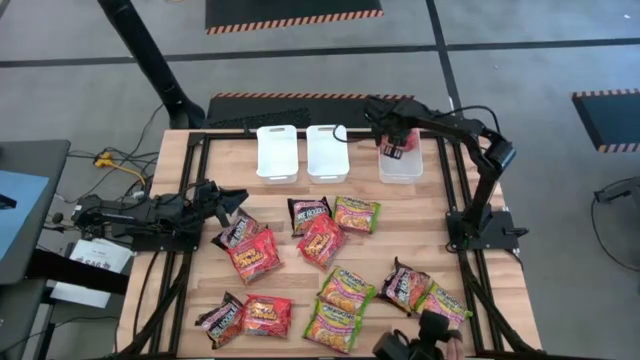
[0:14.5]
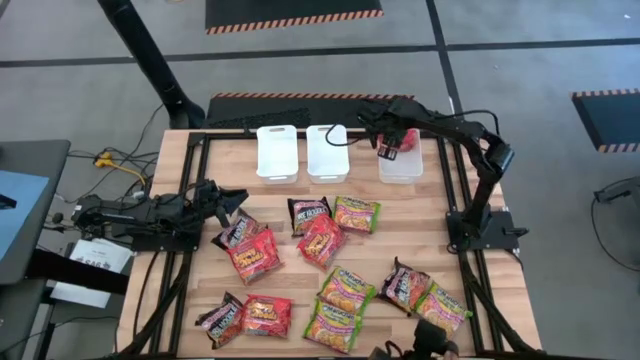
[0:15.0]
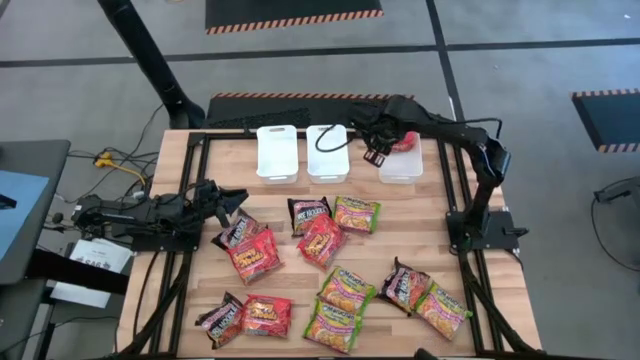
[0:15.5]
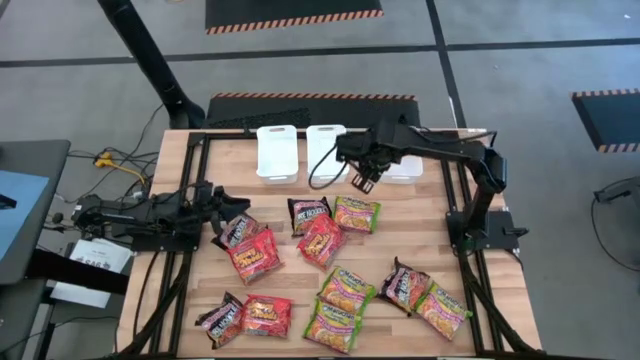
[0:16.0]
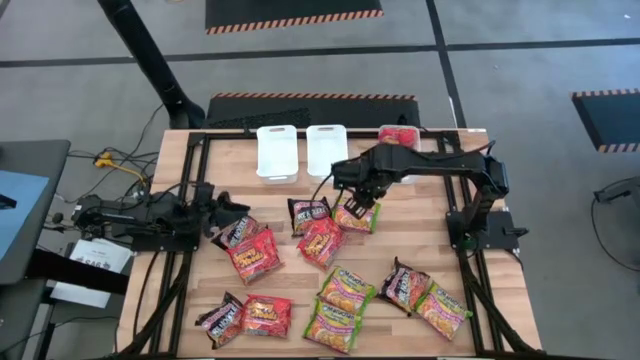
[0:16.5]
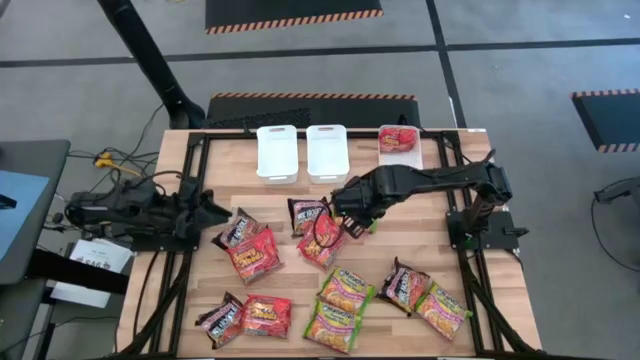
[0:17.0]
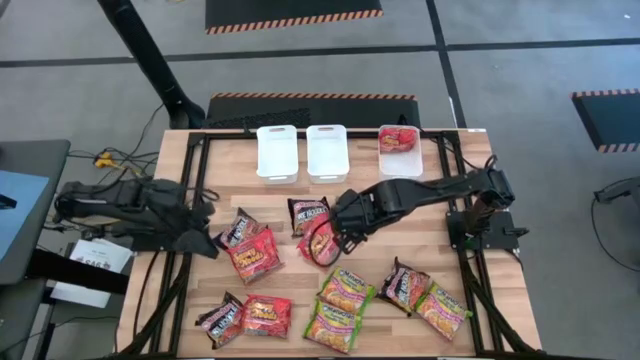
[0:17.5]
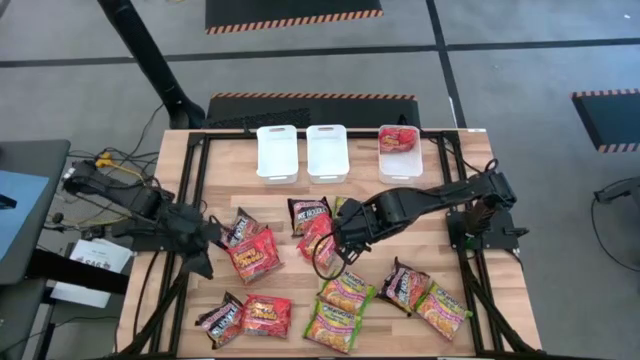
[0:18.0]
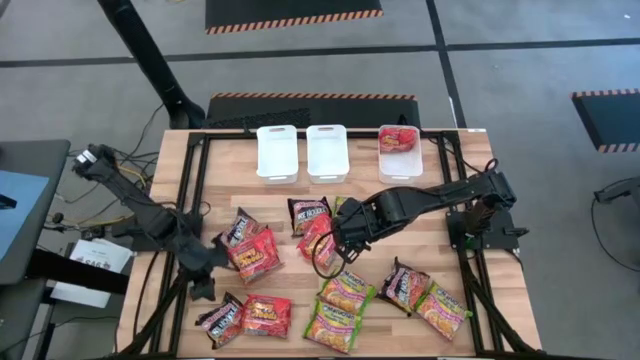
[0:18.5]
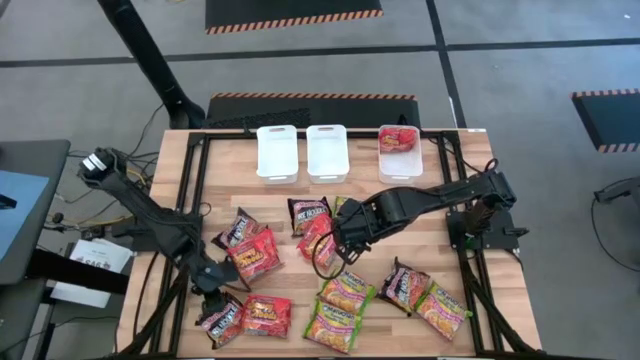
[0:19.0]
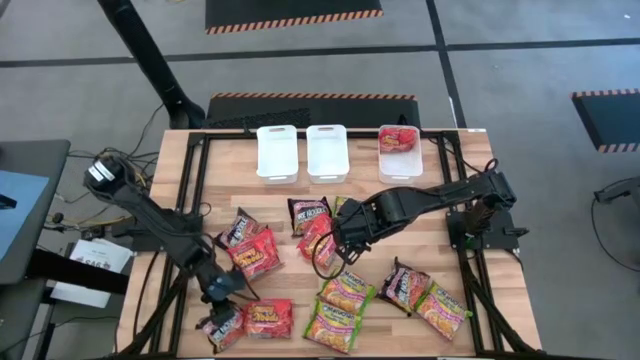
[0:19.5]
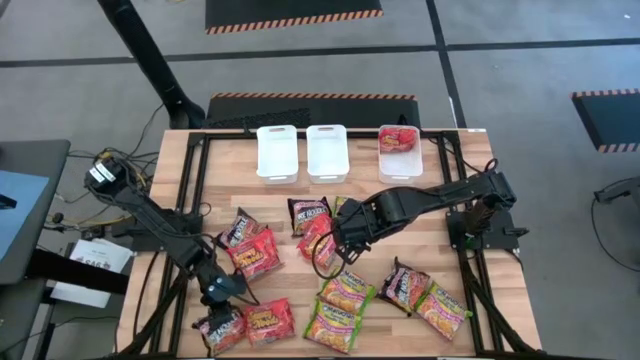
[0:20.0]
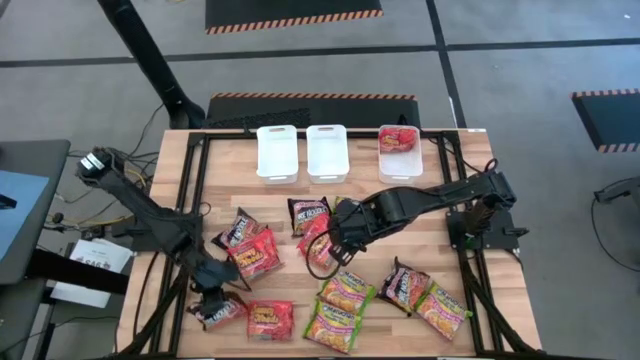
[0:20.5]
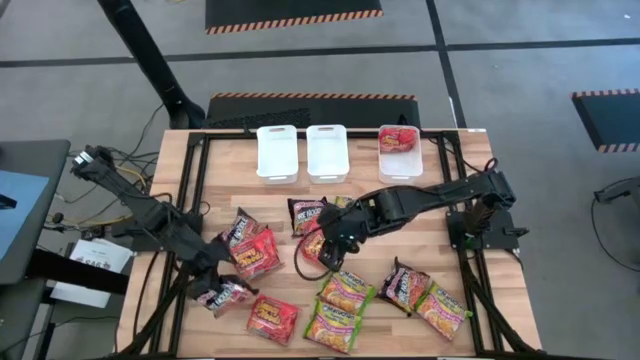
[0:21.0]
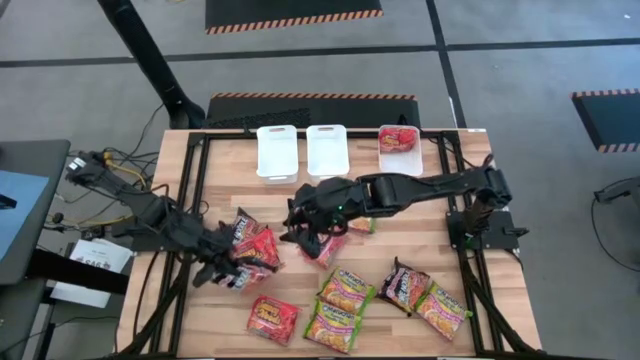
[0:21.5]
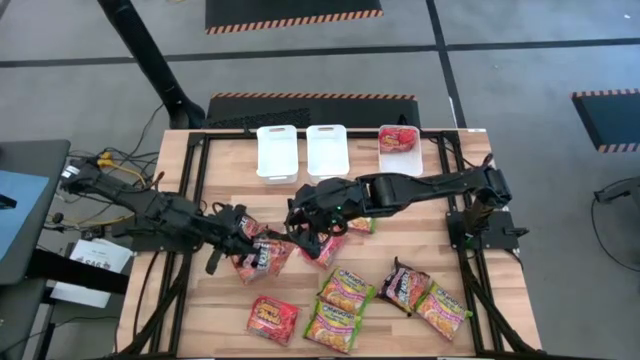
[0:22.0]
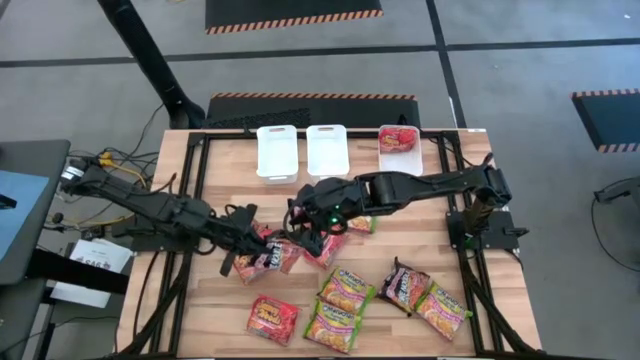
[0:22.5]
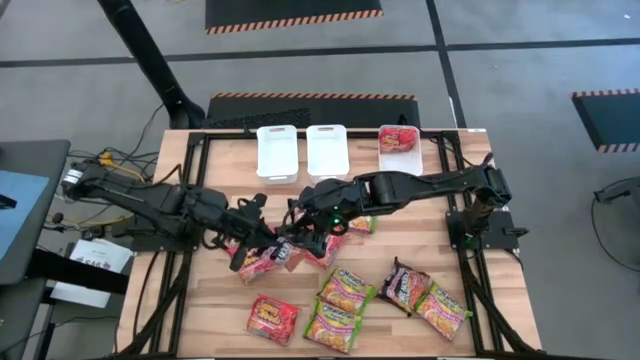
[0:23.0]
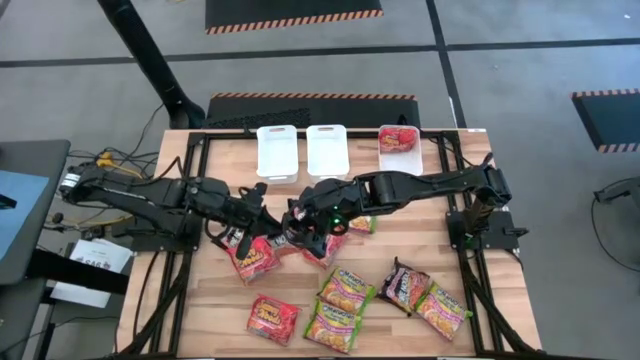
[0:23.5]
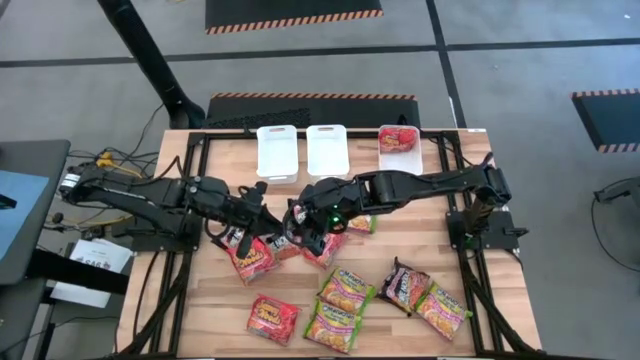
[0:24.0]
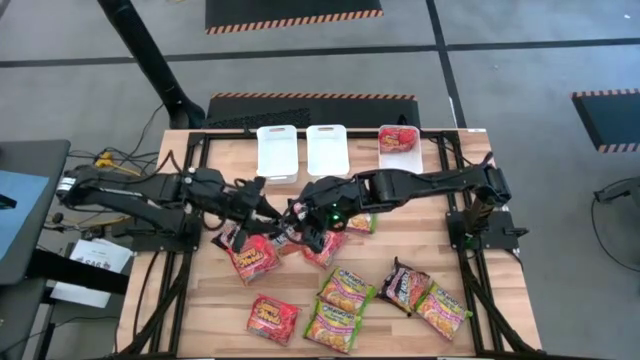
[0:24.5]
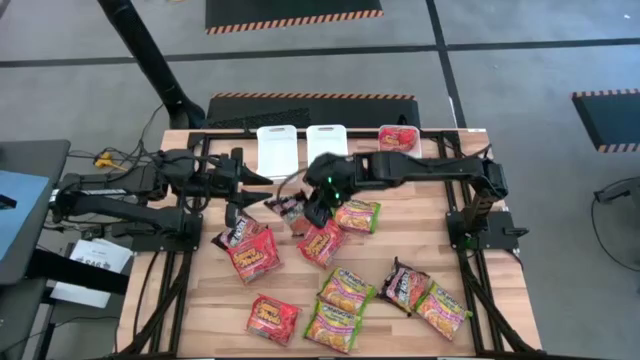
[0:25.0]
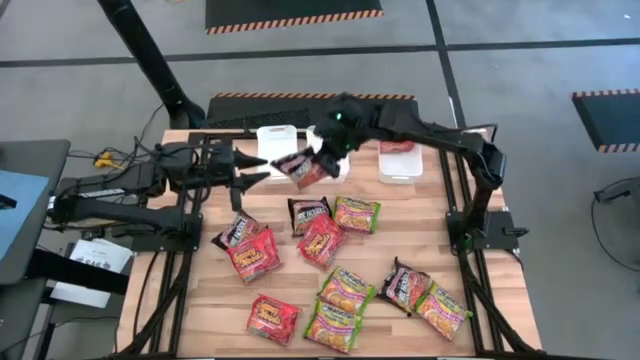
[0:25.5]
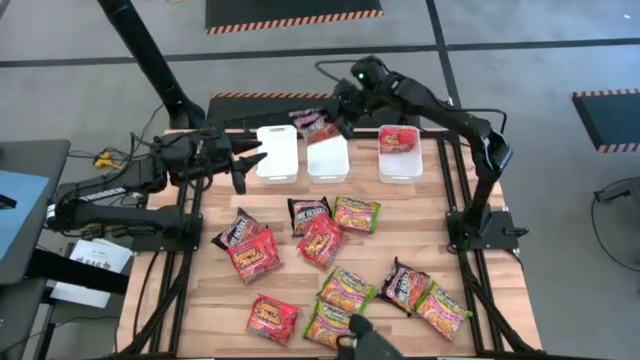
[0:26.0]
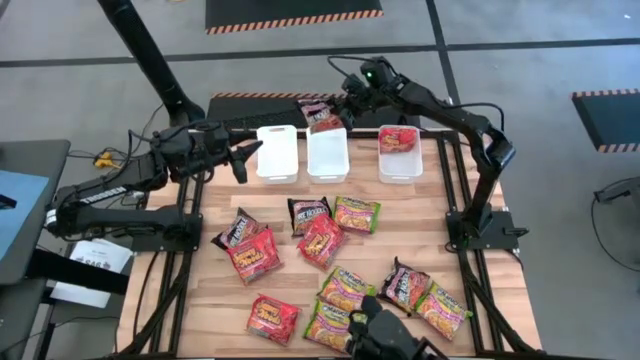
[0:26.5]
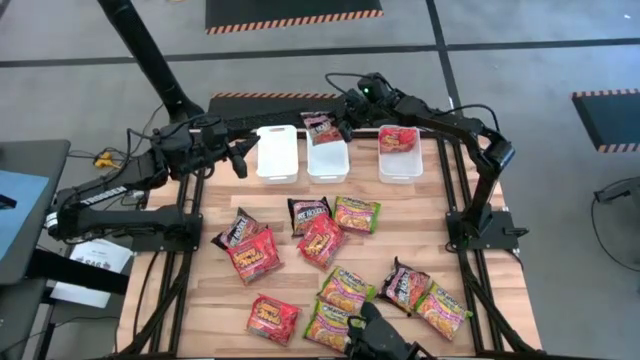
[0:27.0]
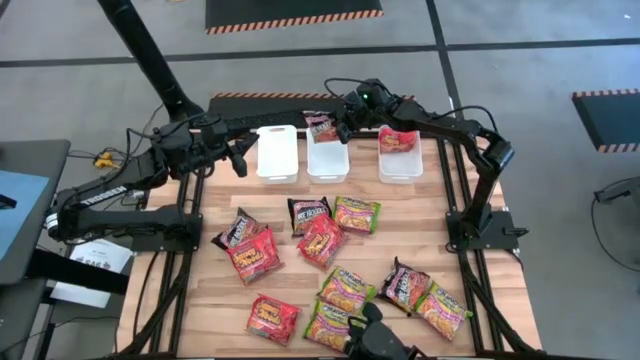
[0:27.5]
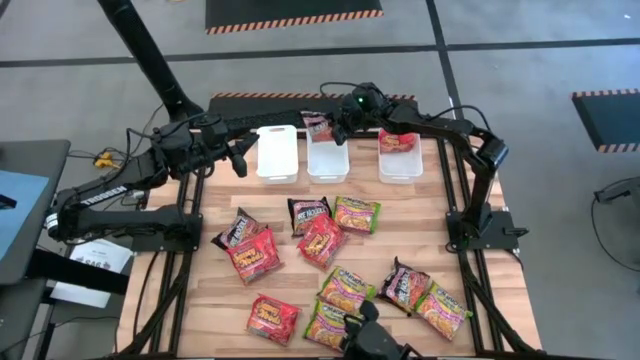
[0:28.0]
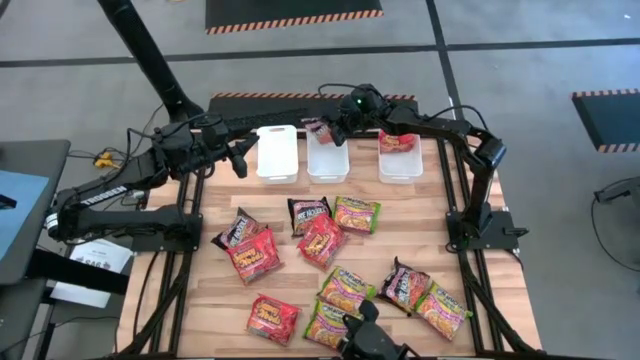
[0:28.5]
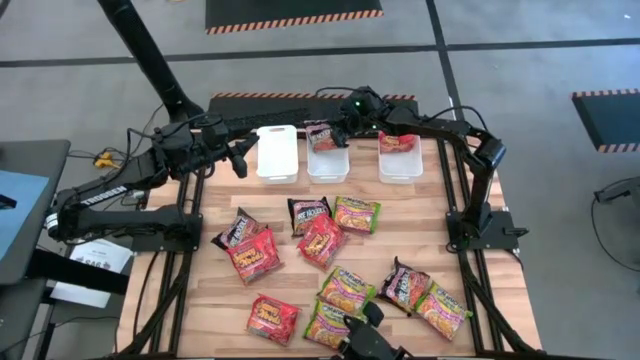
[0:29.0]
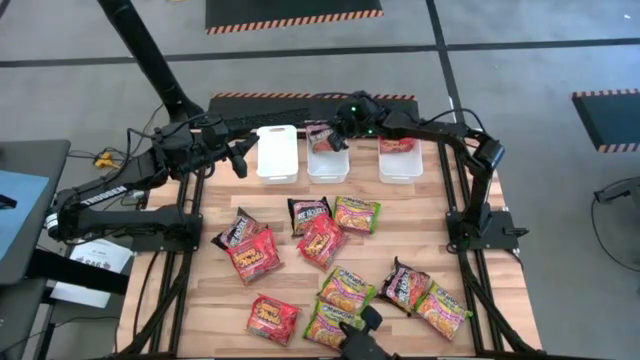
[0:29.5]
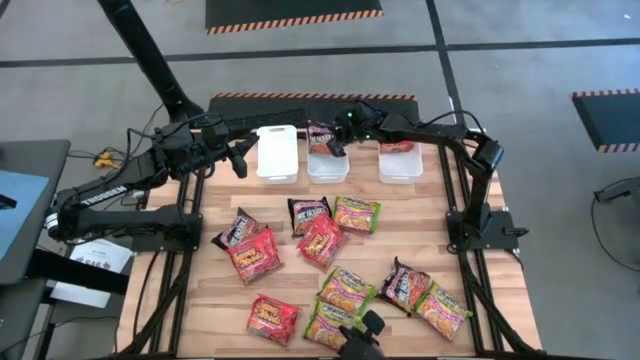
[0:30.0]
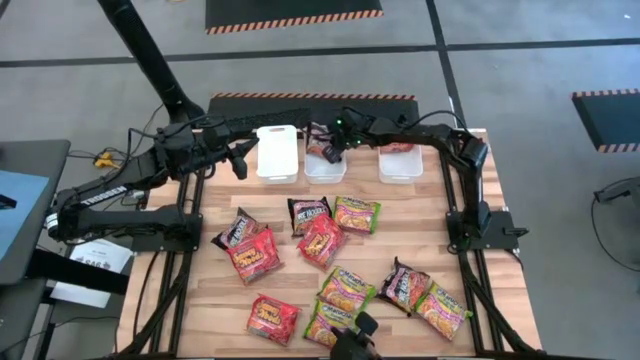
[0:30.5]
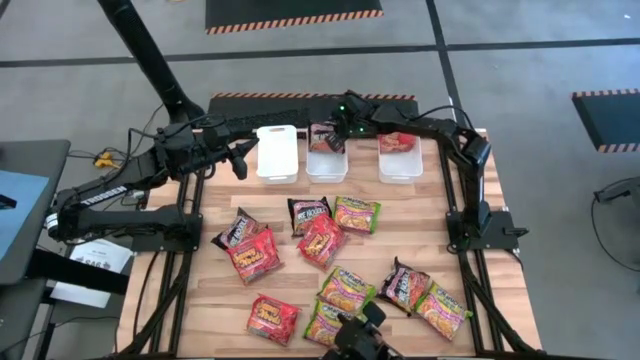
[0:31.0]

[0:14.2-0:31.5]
Task: Sort Maruchan noodles
Put the black noodle pack into the middle white bin

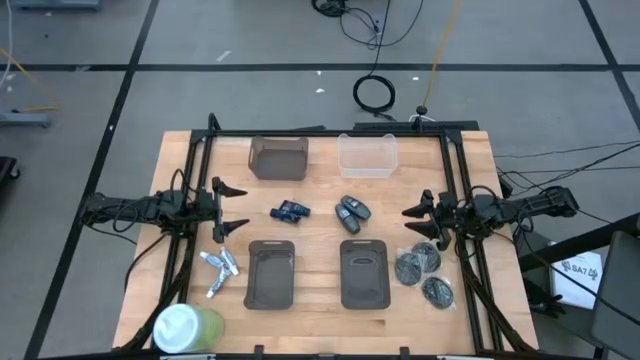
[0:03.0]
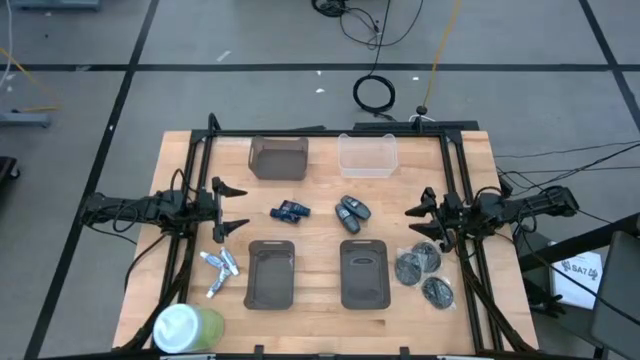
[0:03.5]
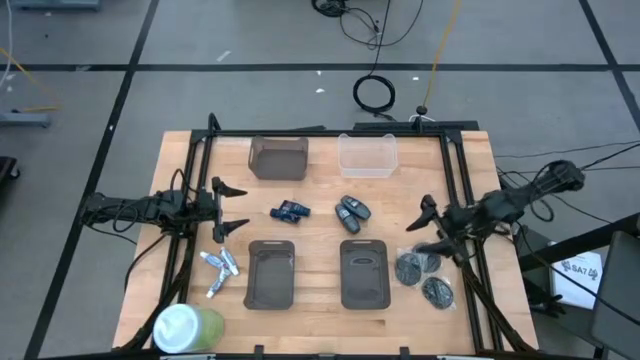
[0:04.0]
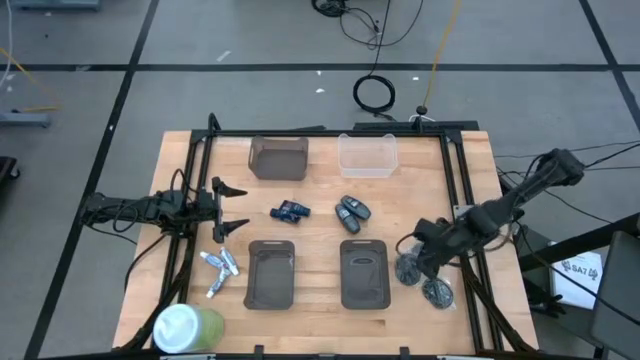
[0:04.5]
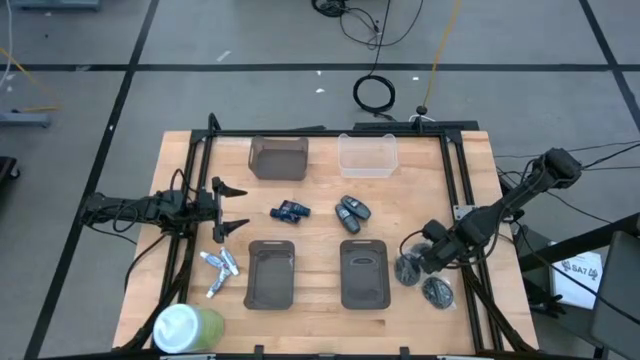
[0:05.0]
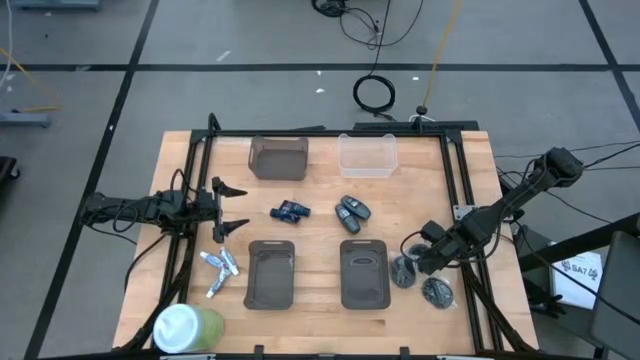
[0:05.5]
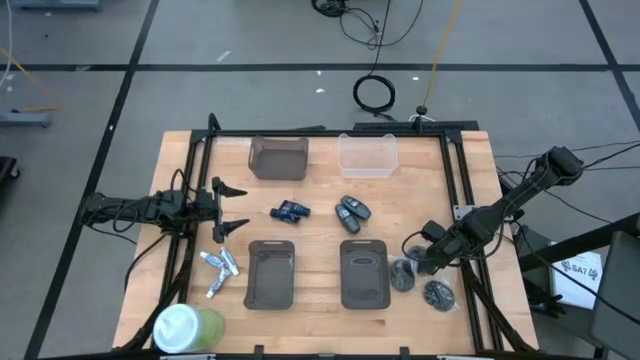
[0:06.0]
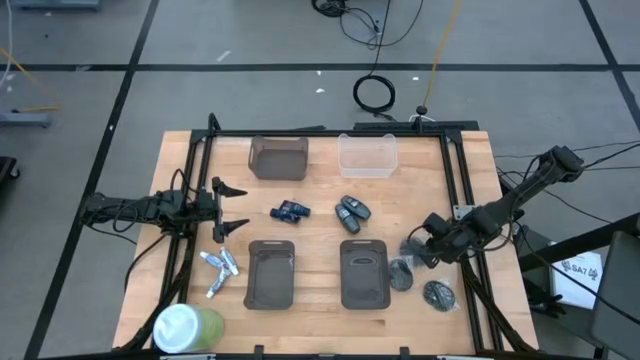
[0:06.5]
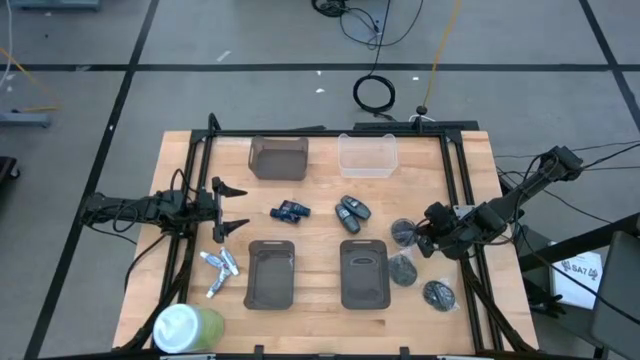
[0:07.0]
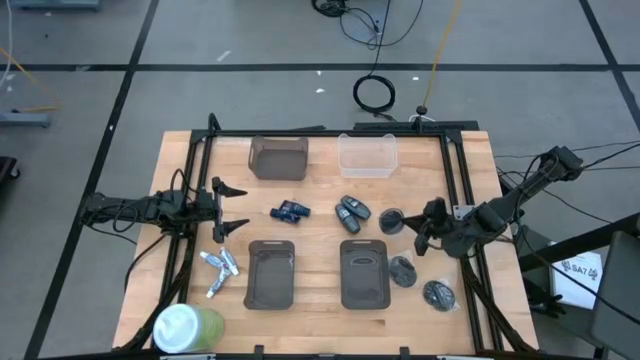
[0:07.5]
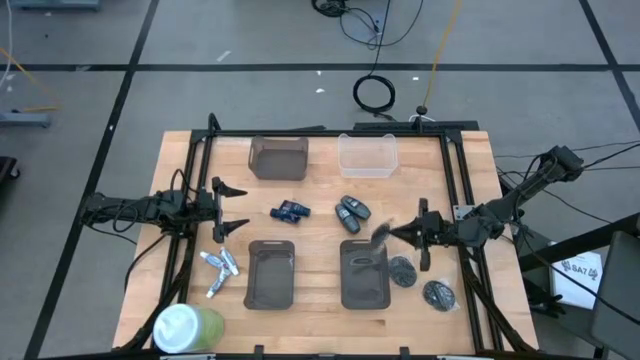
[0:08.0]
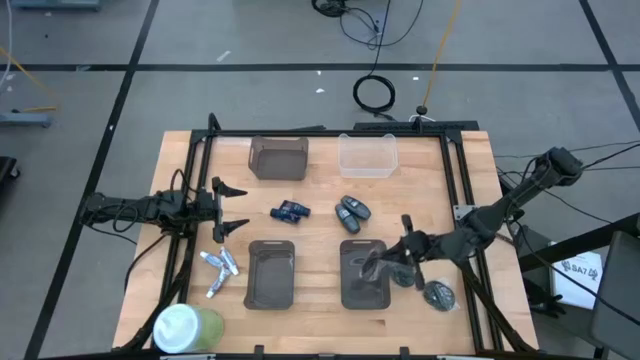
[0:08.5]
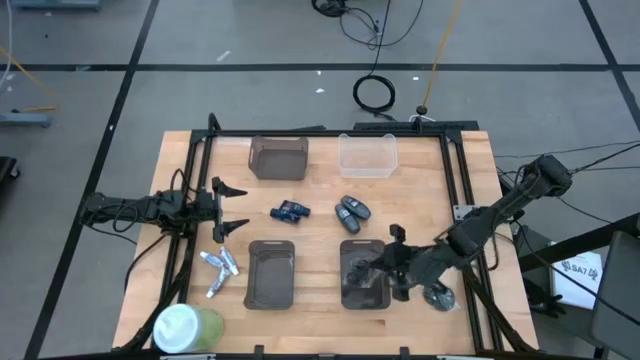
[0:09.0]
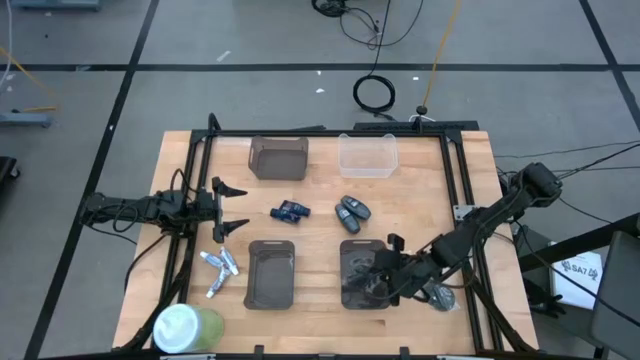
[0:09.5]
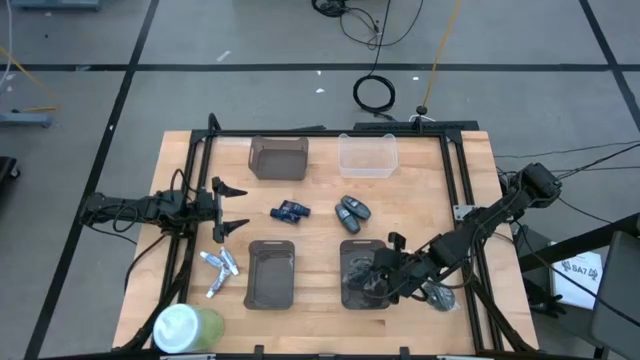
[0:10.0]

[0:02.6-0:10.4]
Task: Pick & Place Travel size toiletries
Put the top right black hairbrush into the bottom right black bin
